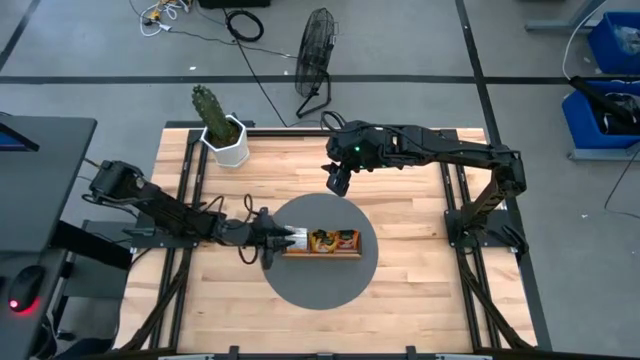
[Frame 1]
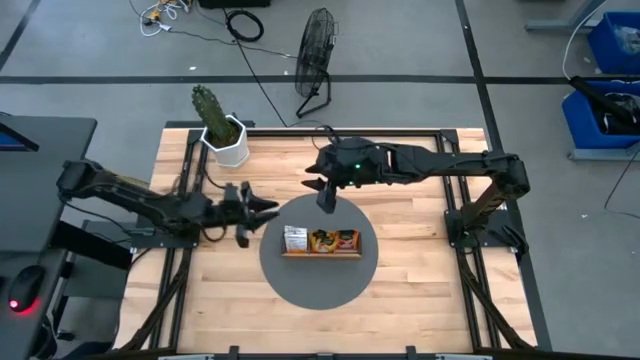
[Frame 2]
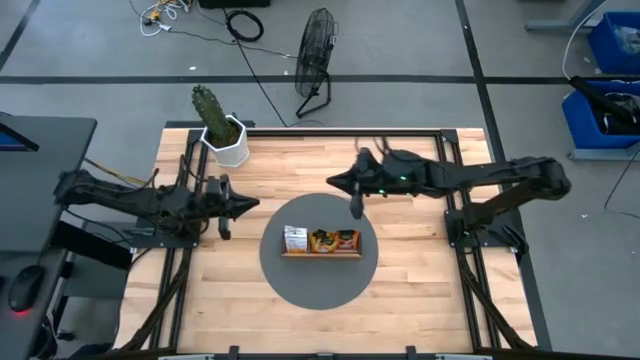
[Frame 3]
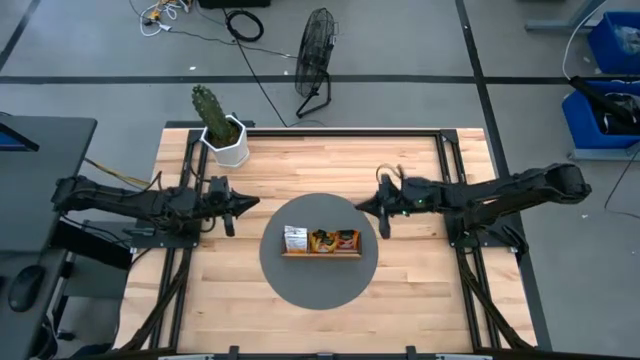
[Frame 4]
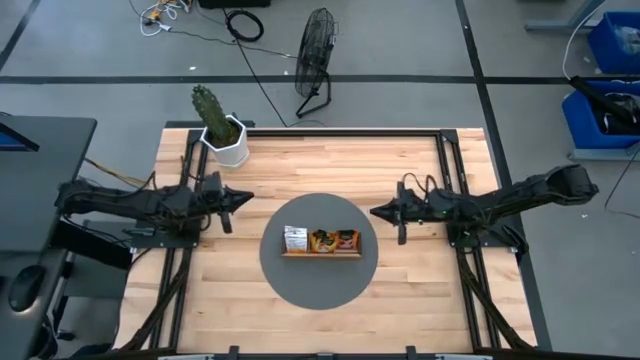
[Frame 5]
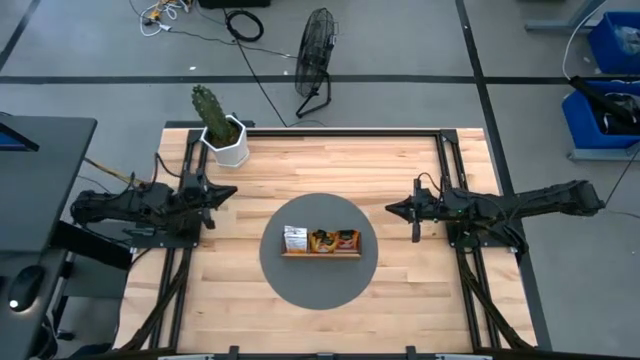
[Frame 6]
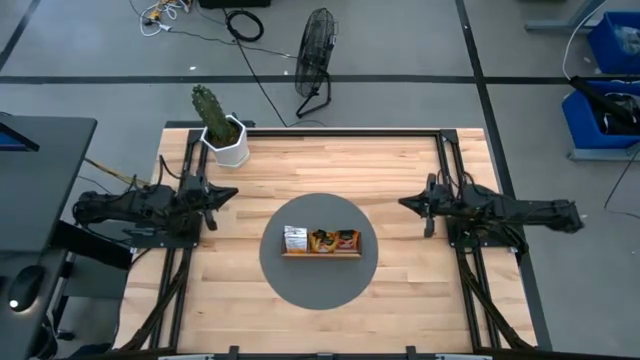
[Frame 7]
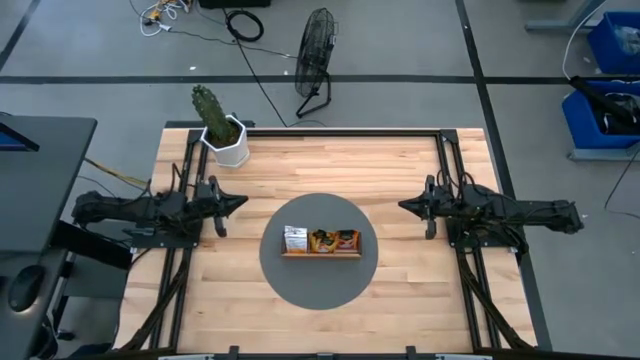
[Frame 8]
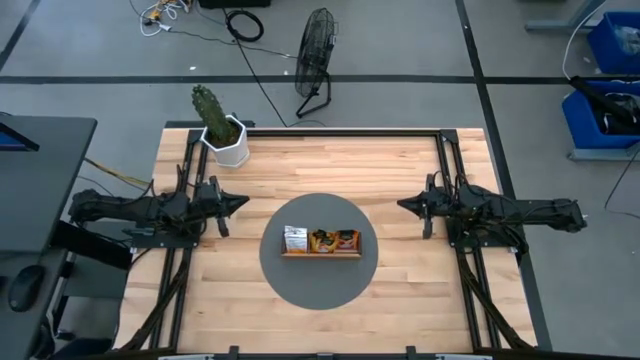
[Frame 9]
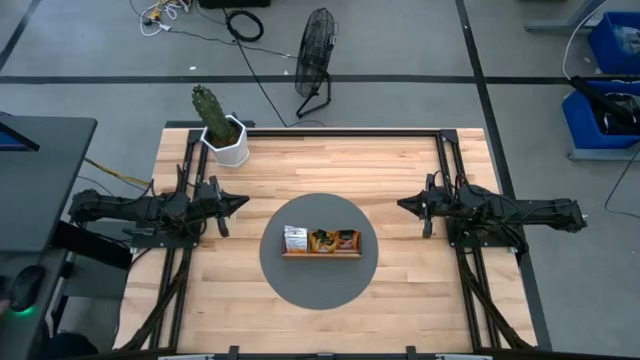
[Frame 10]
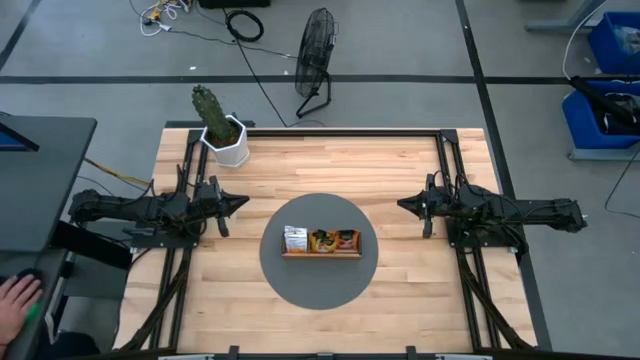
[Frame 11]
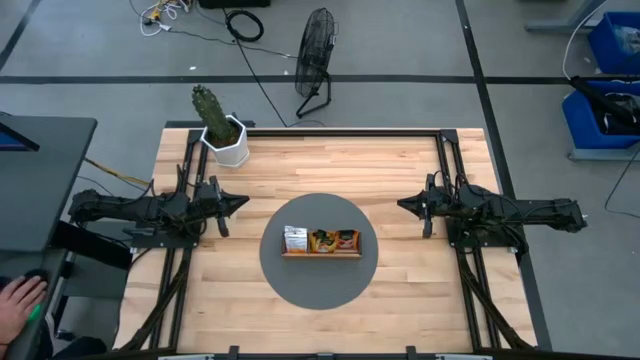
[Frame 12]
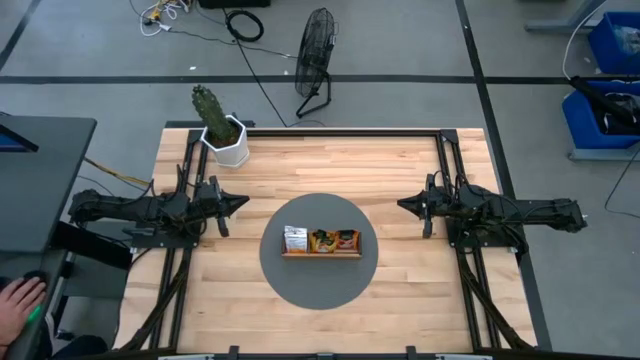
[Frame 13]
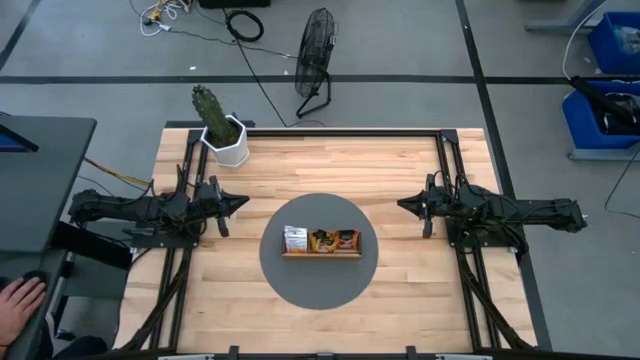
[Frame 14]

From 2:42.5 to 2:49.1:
Task: Pick & Place Tea
Return to Home Position

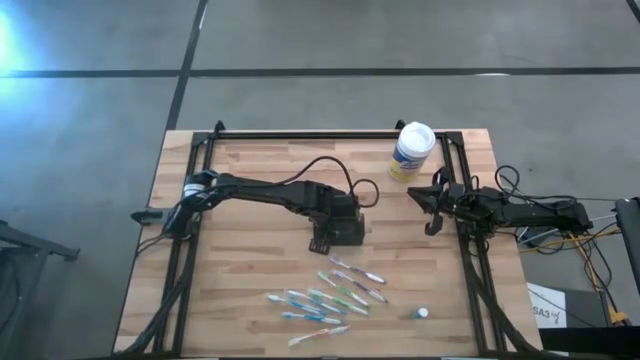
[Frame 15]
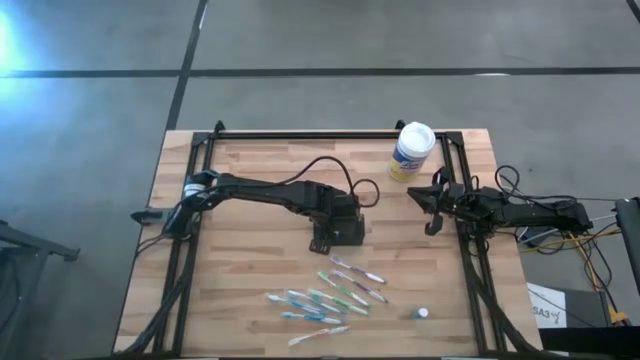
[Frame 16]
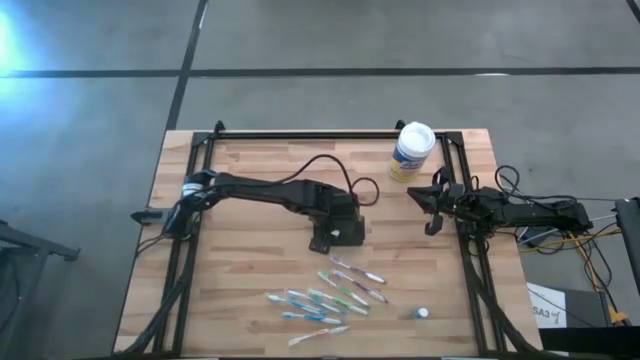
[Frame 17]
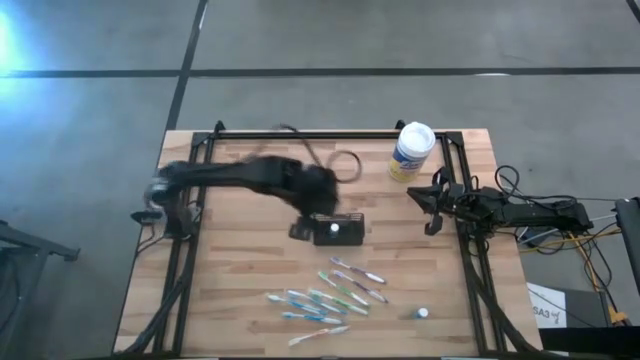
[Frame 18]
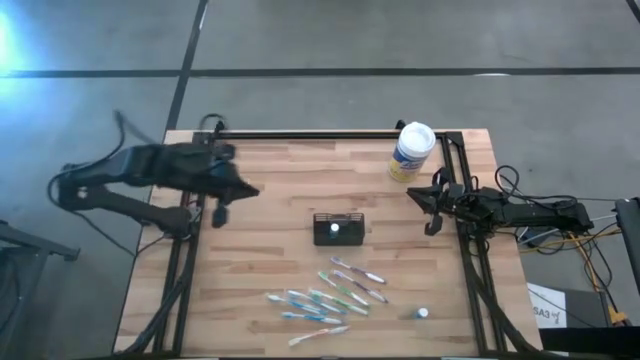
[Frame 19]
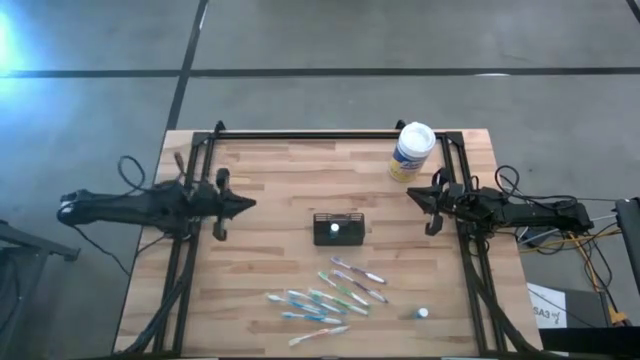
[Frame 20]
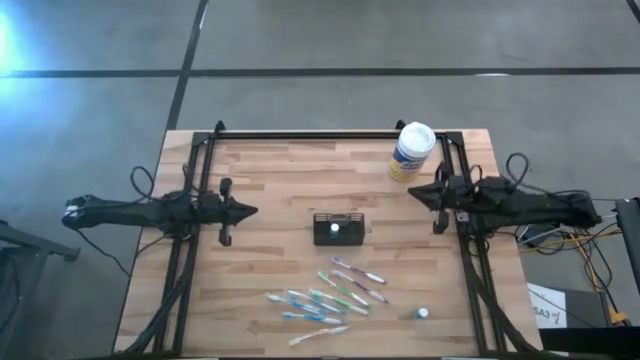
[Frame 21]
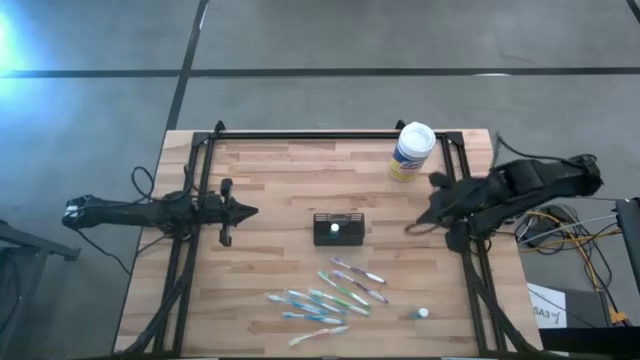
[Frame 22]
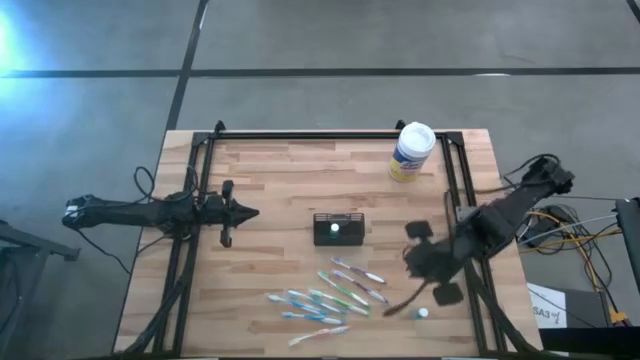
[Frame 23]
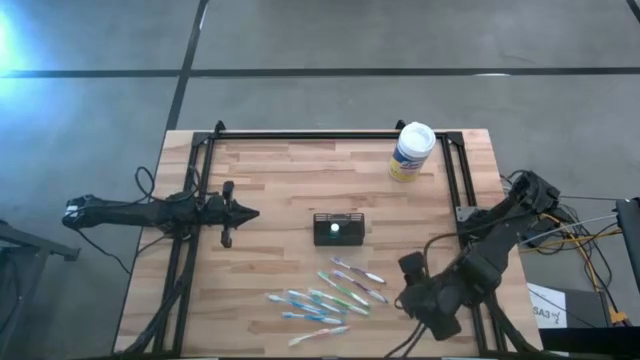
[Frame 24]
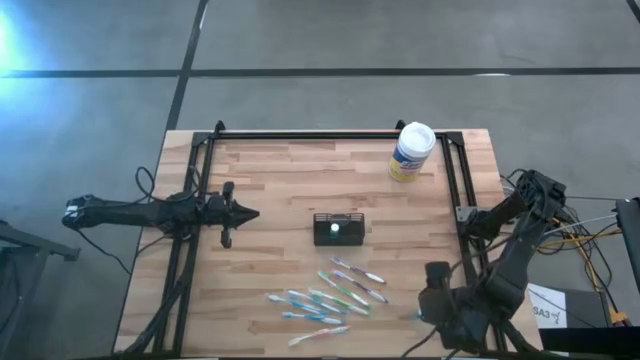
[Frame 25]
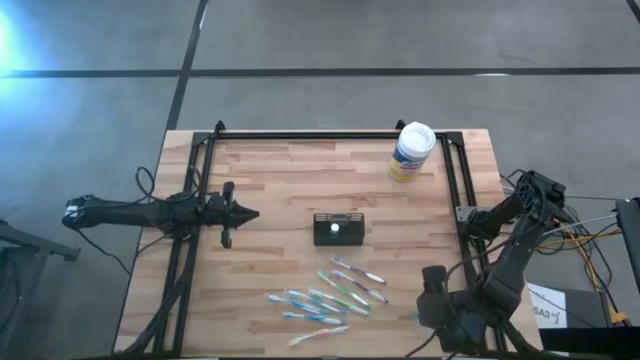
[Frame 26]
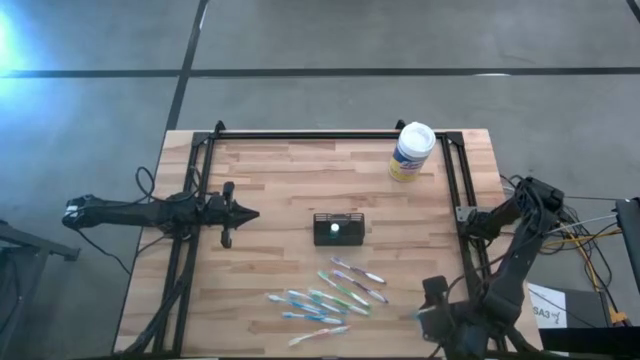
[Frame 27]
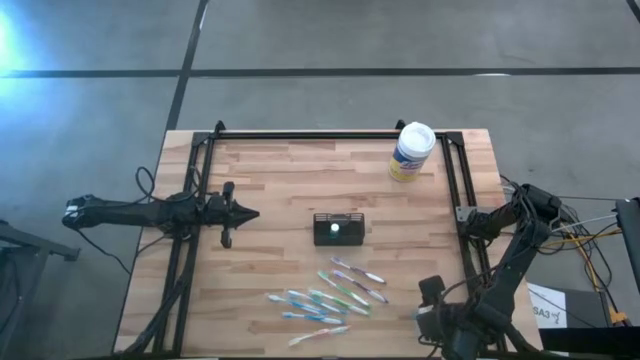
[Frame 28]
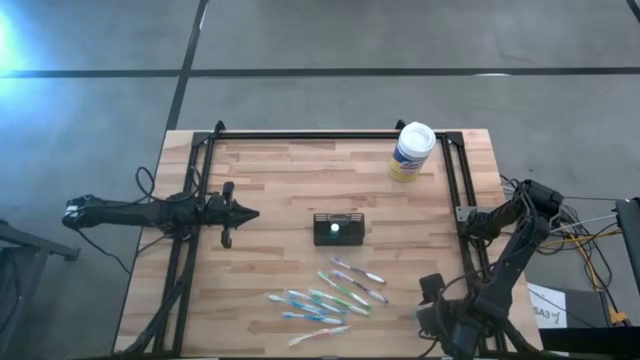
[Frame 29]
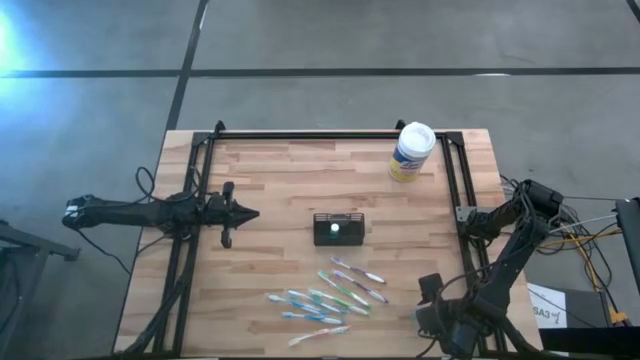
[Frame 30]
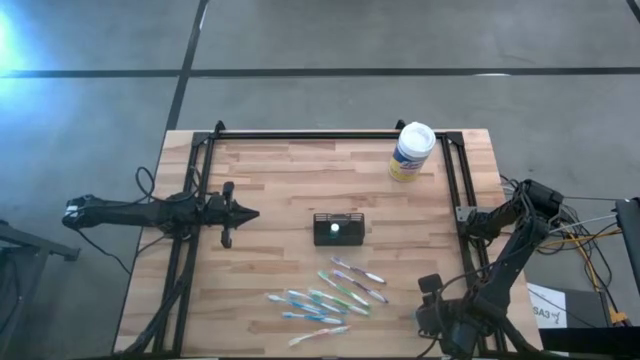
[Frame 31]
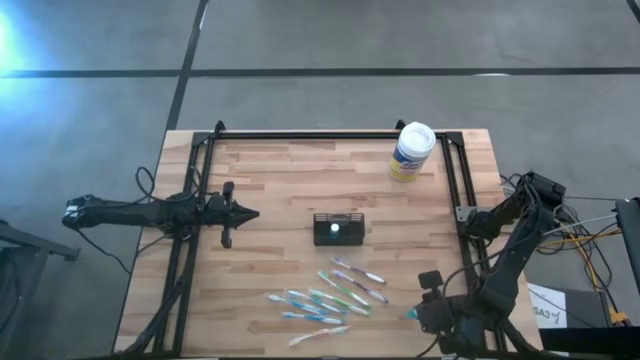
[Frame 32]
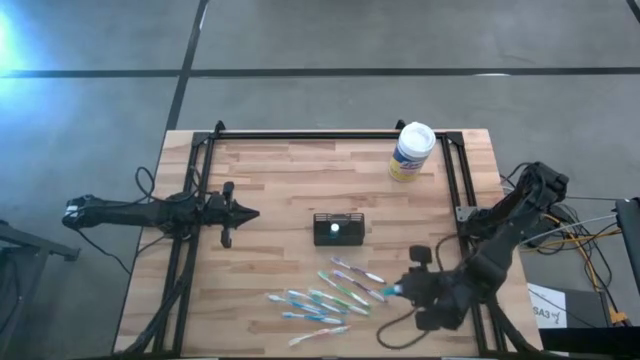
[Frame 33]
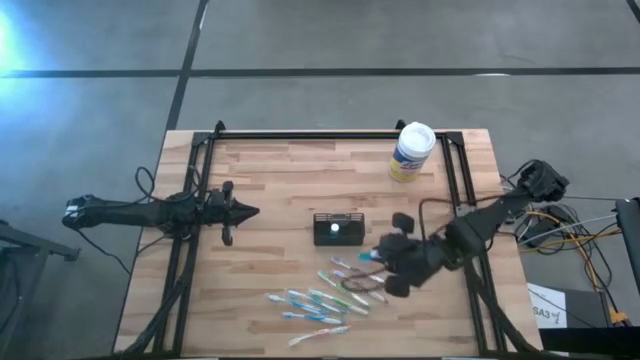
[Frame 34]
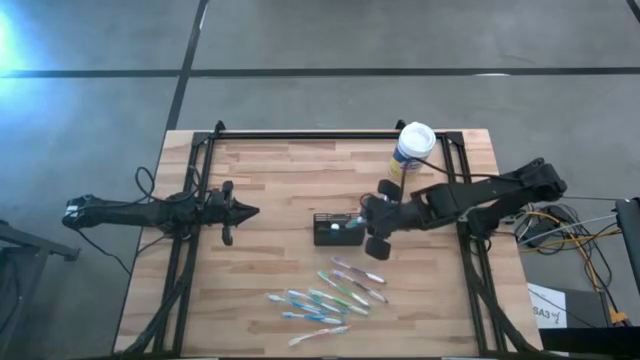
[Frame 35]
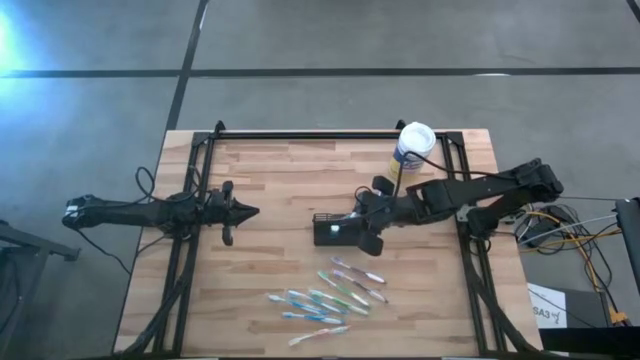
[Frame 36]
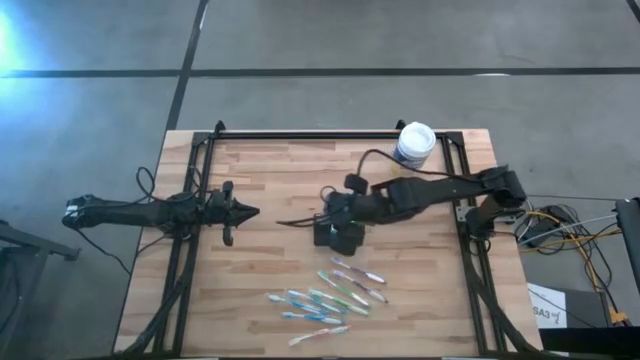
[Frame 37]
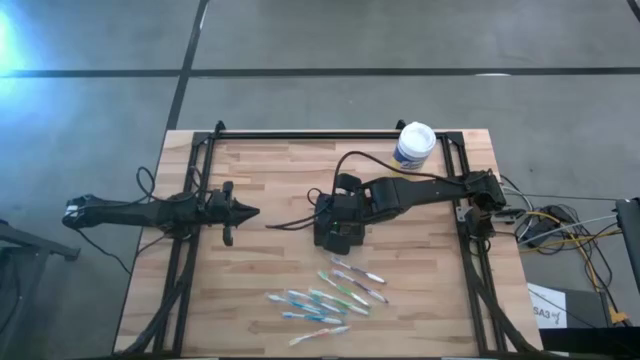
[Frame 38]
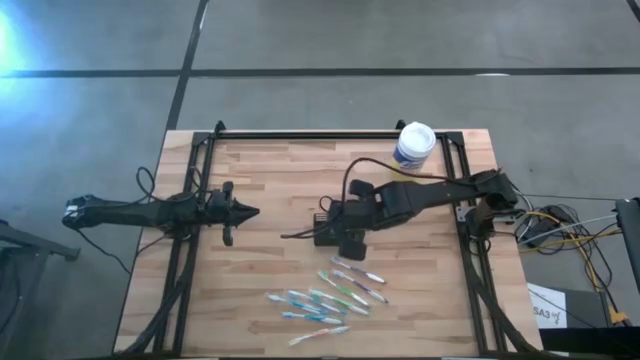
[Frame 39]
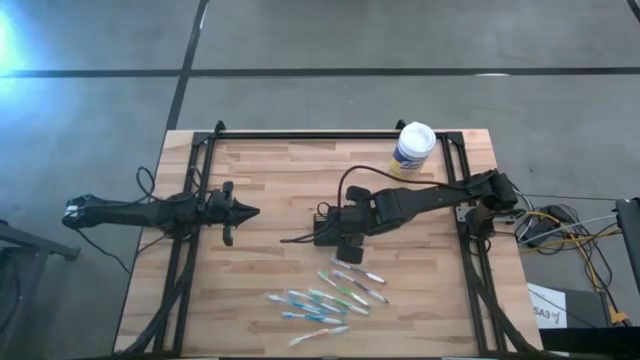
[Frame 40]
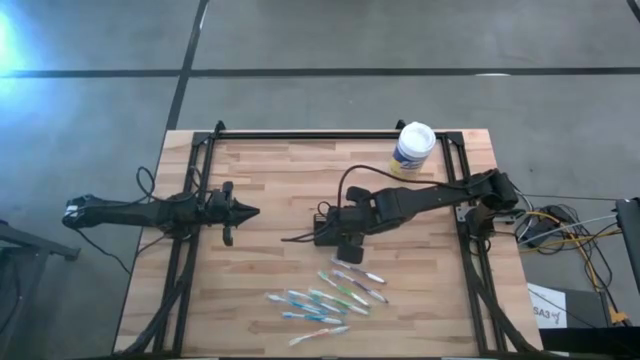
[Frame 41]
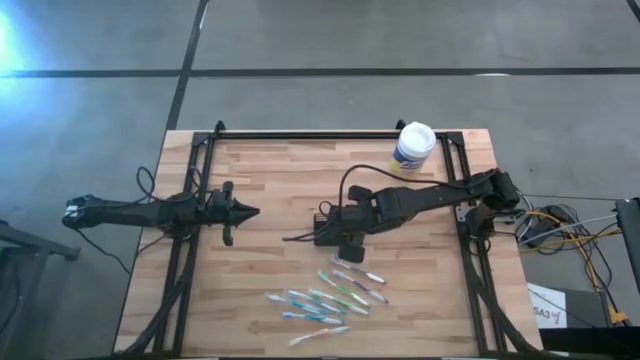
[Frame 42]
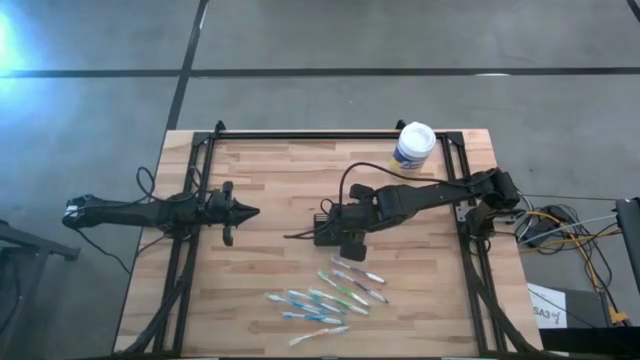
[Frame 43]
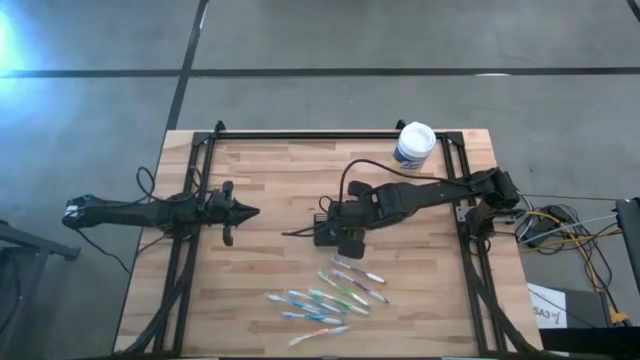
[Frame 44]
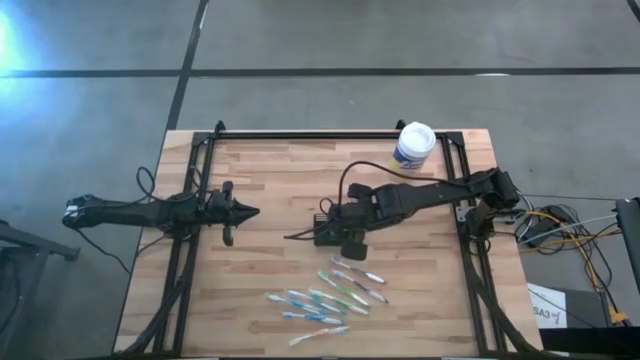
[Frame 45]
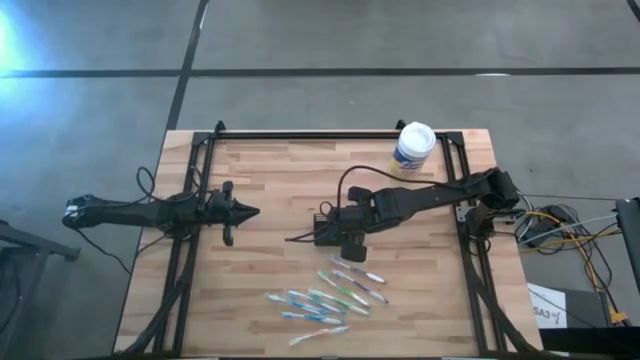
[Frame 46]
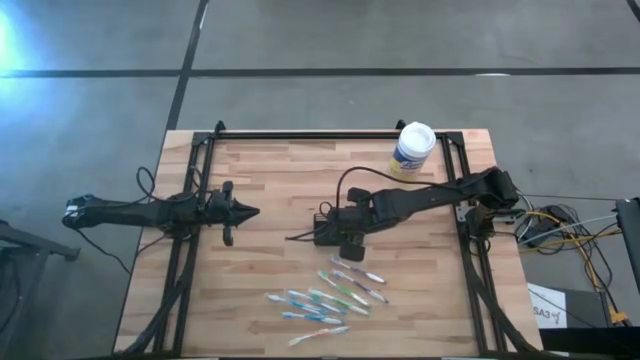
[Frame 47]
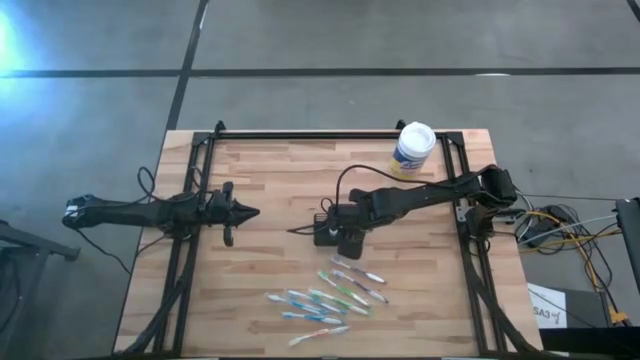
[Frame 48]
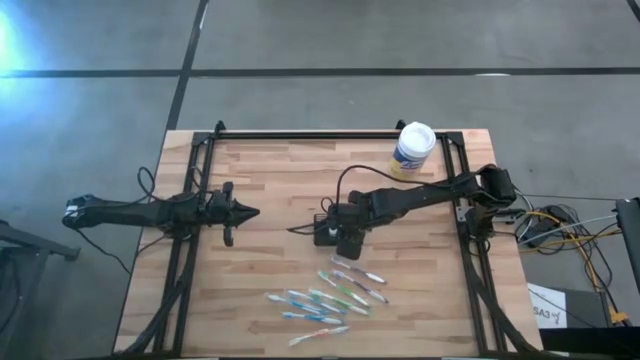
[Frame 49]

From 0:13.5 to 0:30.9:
Task: Pick & Place toothbrushing station
Put the blue mouthwash into the mesh organizer
